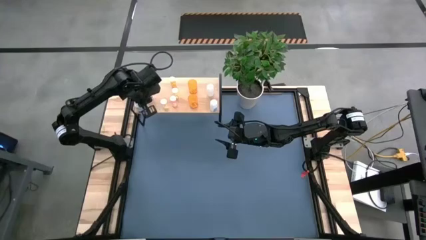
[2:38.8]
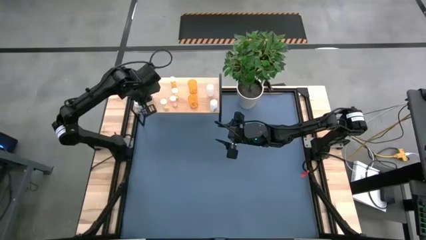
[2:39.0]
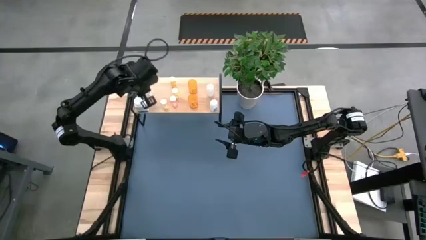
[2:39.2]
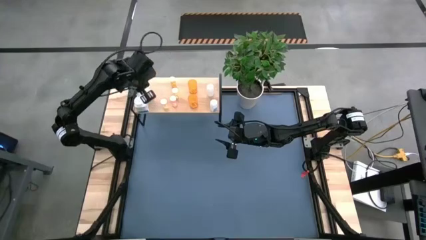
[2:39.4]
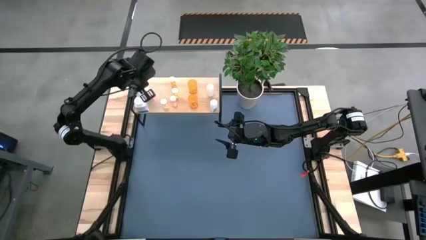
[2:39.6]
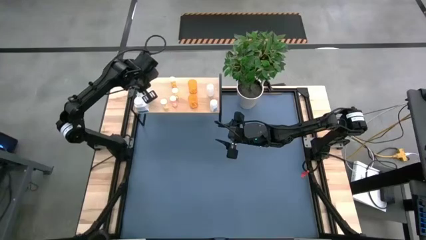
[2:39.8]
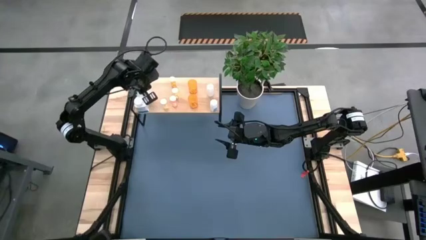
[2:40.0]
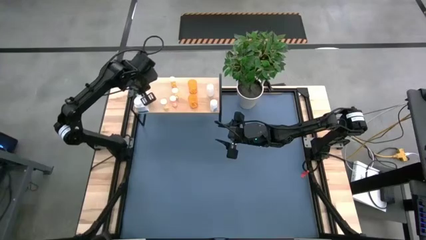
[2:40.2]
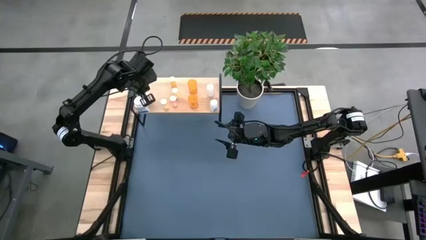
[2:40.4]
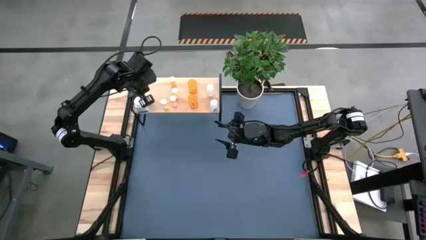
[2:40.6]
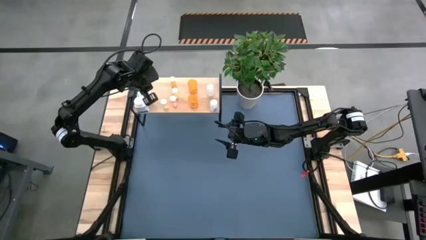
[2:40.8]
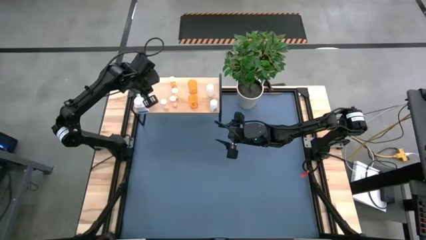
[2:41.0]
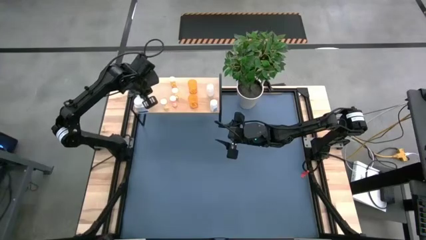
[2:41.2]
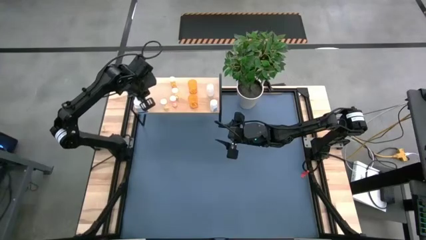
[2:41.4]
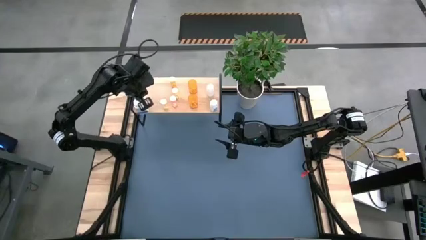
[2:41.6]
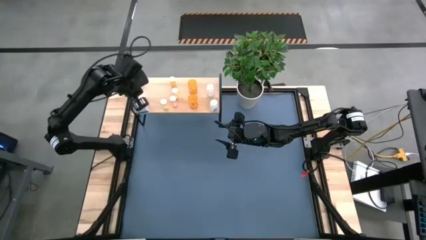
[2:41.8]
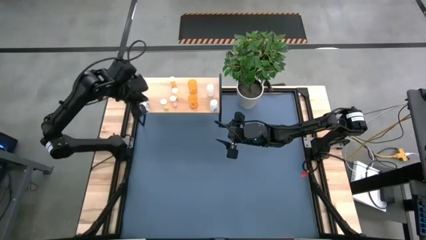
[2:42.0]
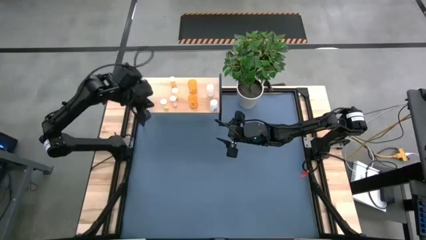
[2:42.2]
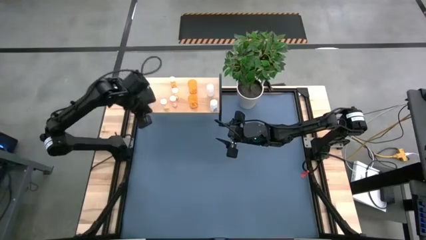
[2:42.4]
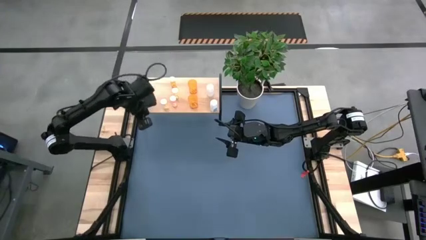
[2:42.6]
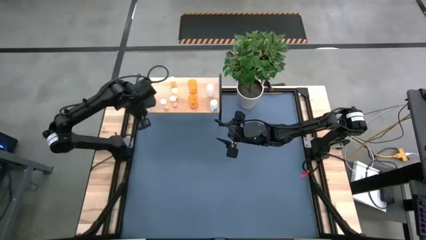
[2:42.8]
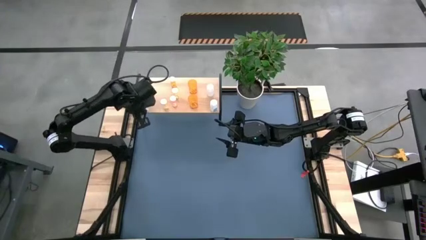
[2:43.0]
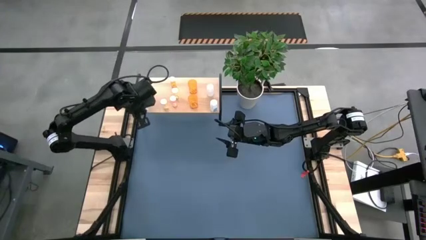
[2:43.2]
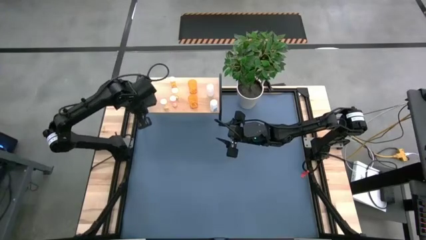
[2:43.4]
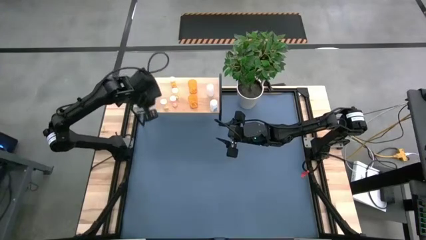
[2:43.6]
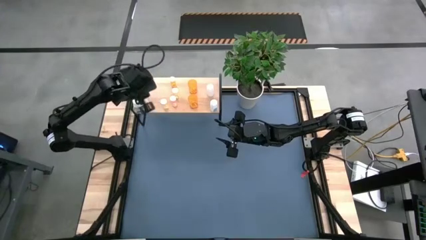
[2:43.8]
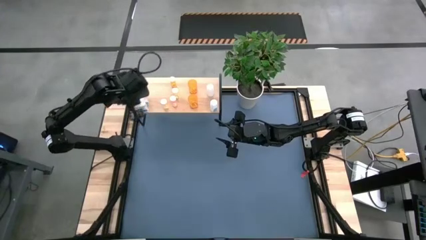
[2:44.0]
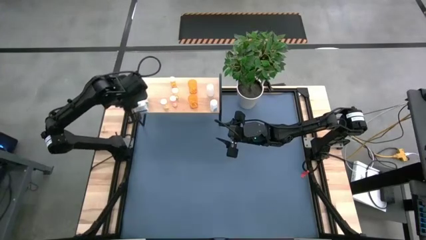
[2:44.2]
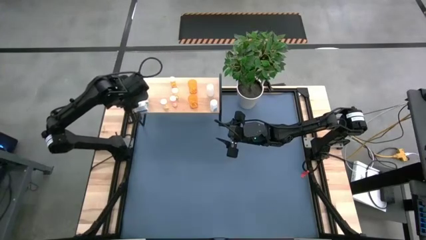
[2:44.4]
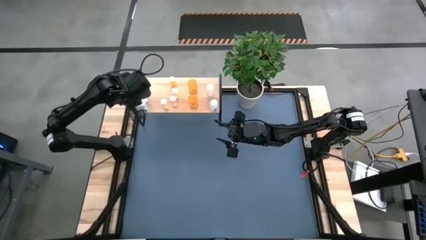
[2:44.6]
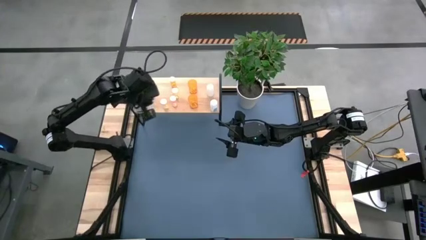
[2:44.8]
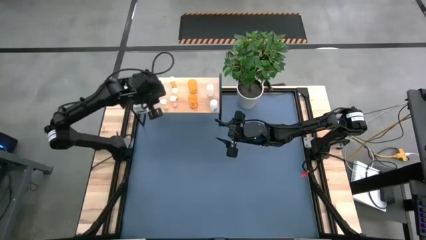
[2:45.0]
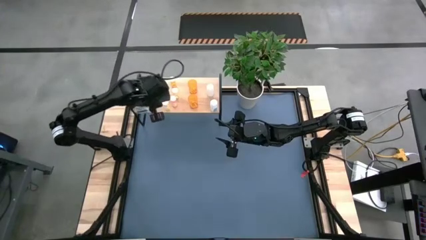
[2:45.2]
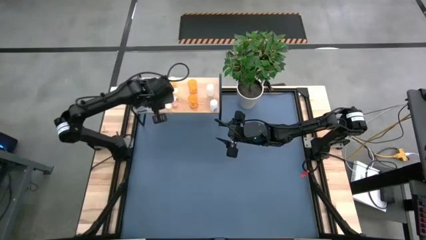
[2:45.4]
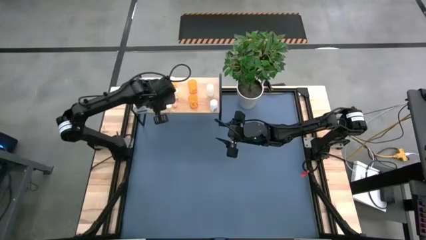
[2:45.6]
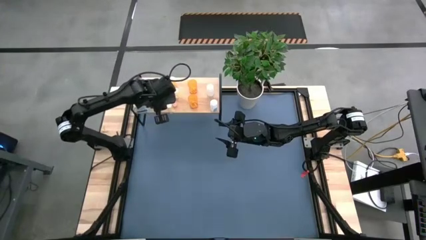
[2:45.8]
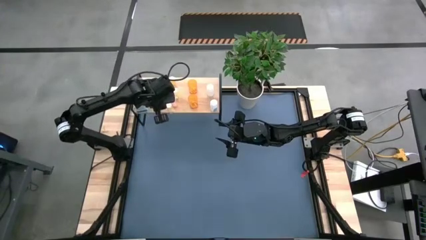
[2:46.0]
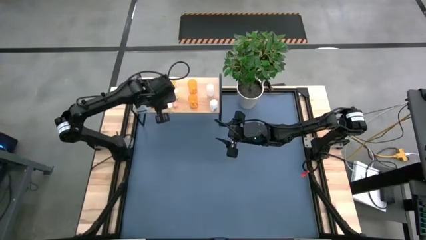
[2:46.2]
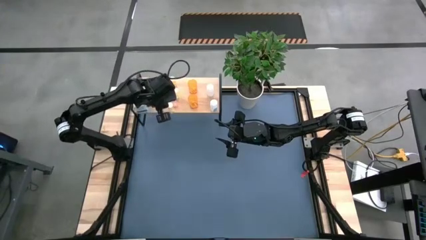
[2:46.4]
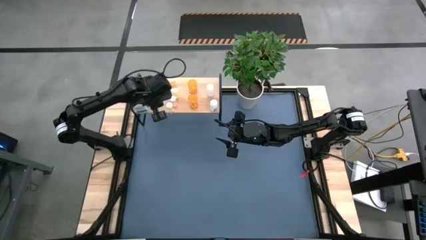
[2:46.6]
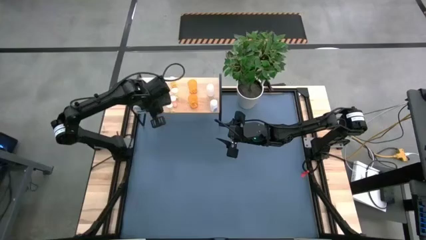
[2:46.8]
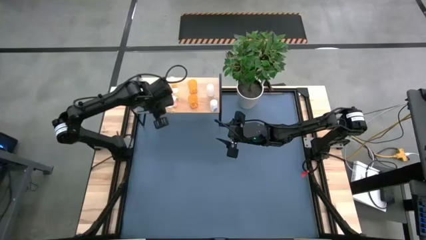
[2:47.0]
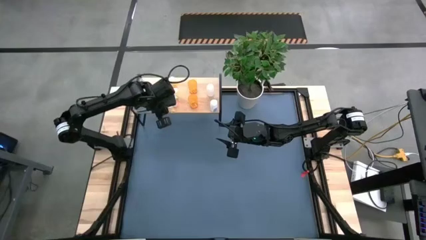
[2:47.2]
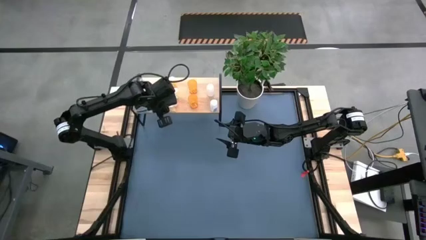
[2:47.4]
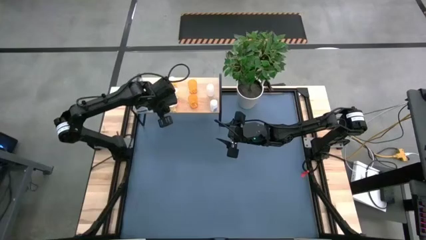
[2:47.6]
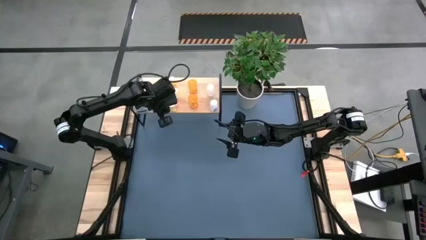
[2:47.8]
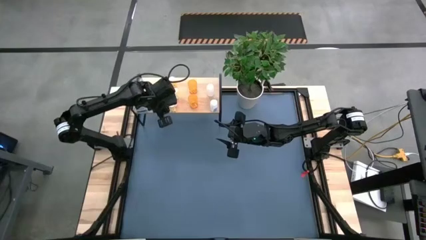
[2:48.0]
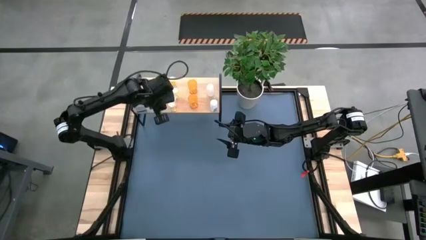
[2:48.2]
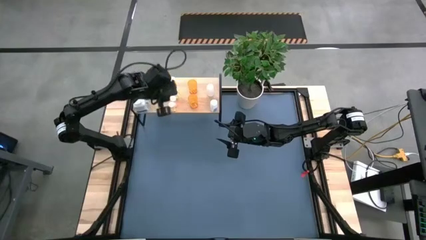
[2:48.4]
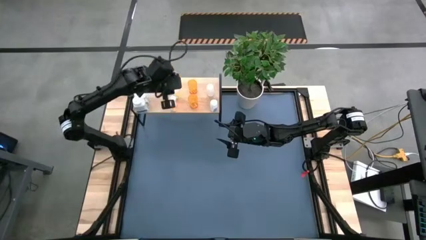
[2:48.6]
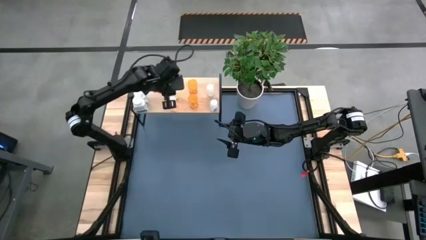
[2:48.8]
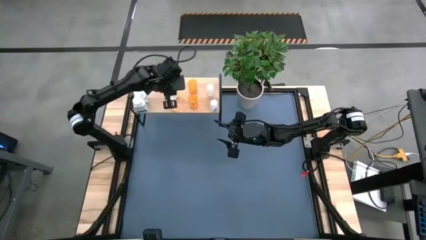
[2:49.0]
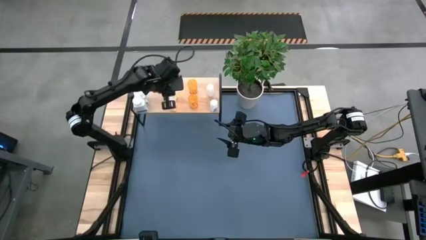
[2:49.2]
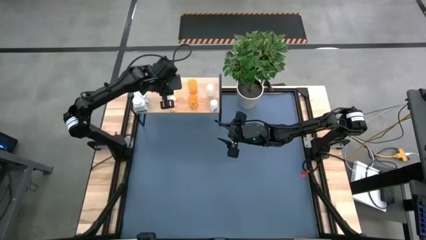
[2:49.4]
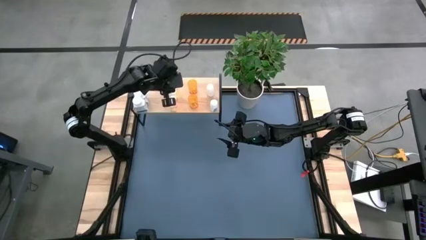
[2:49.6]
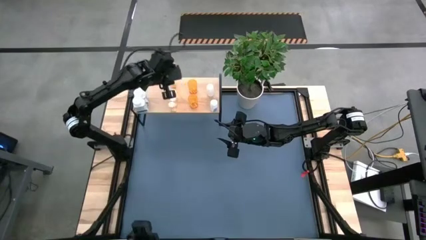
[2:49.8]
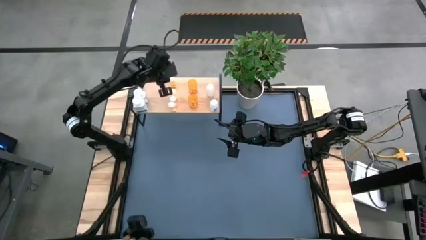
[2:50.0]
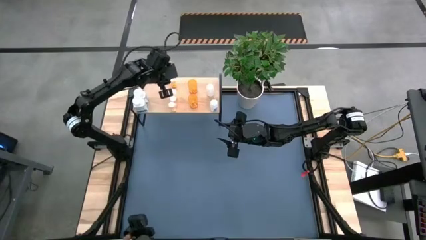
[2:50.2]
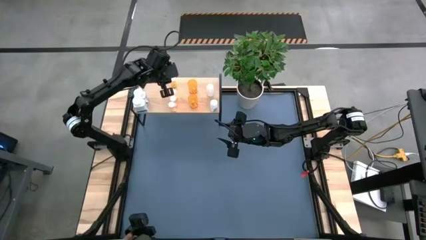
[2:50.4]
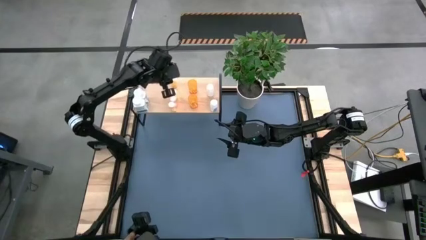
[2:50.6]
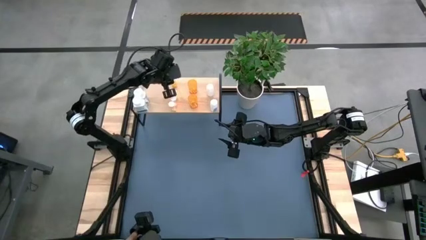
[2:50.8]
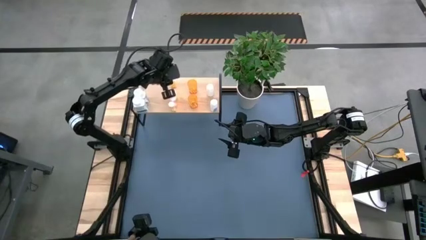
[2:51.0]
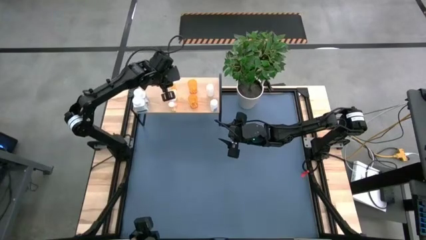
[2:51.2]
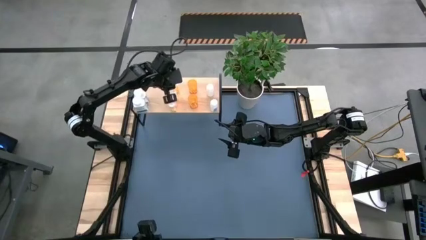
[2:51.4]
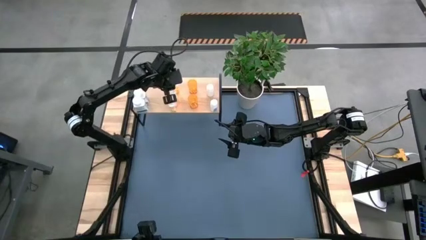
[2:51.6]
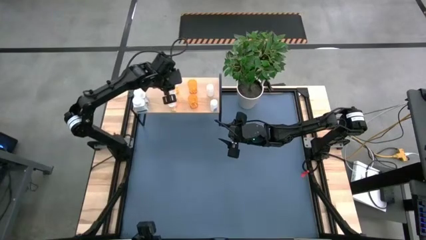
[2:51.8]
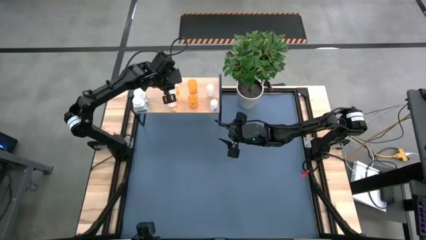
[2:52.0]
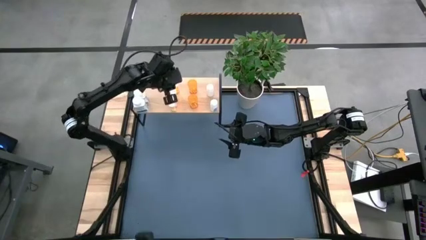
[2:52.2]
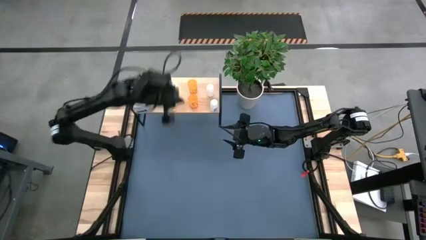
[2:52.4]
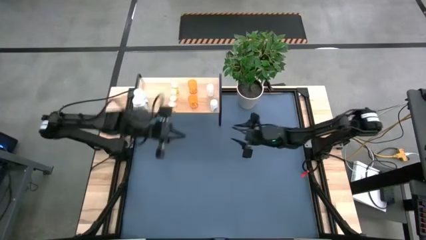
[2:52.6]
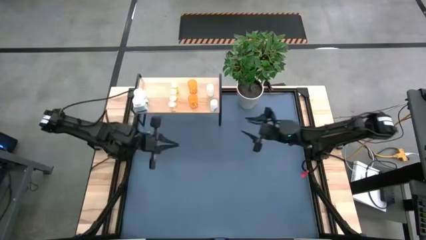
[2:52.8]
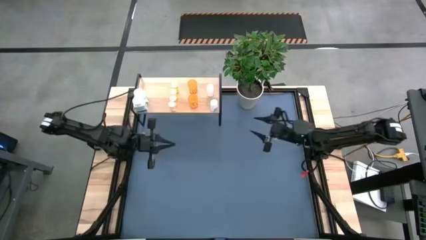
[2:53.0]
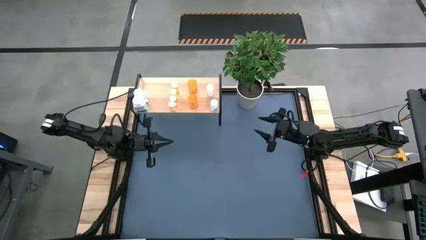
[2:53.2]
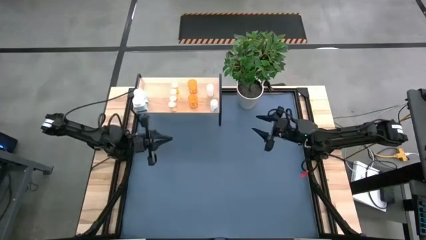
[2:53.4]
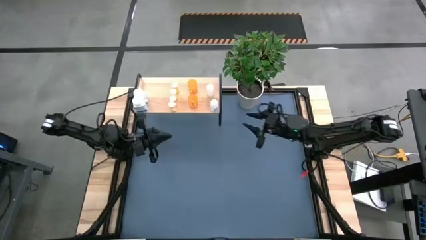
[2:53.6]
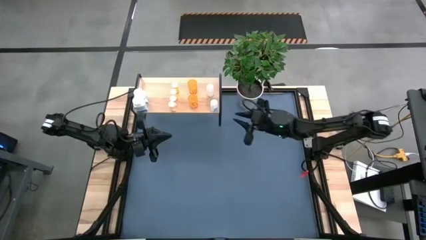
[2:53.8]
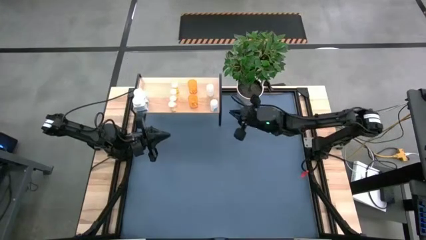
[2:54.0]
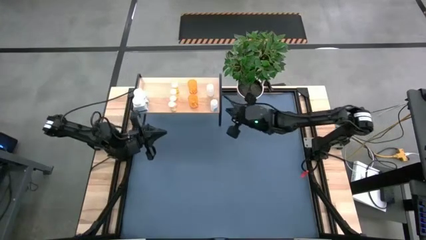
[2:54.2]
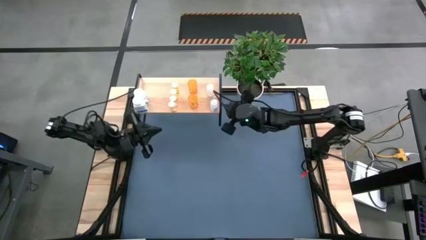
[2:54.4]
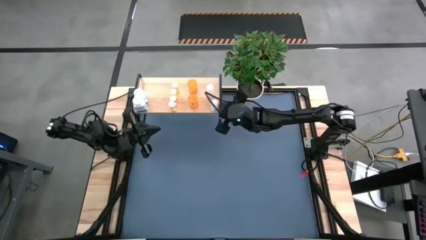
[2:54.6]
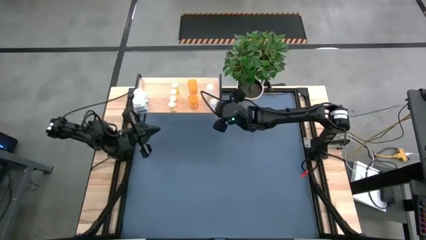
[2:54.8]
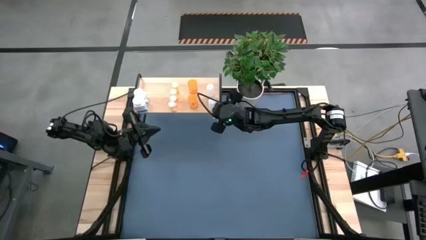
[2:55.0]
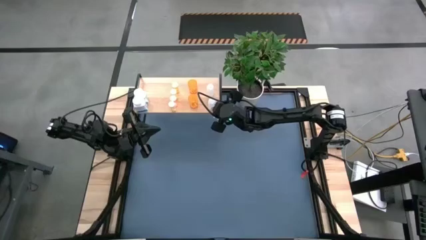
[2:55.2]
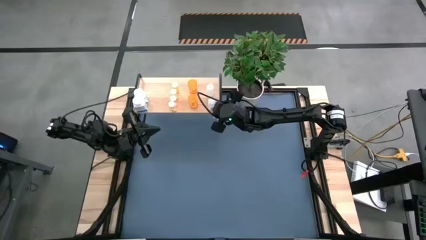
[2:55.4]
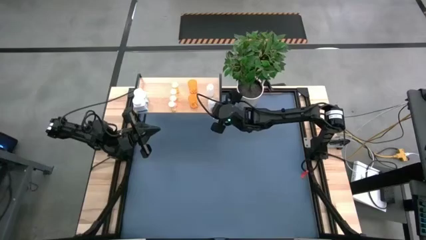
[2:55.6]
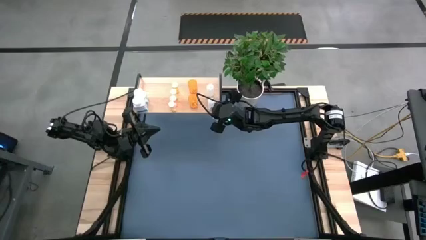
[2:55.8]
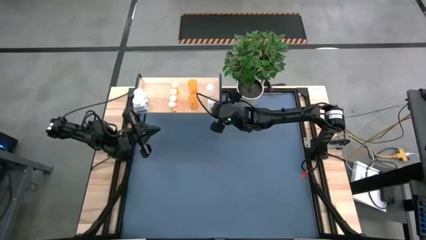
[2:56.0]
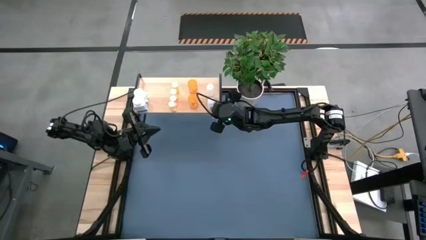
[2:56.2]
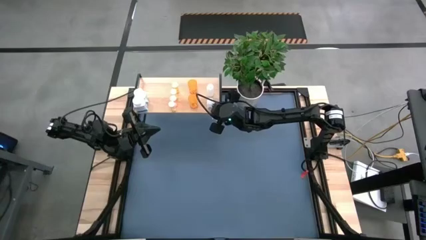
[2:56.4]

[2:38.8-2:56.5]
Task: Pick and place medicine bottles onto shelf by color
Adjust the pill bottles on the shelf
